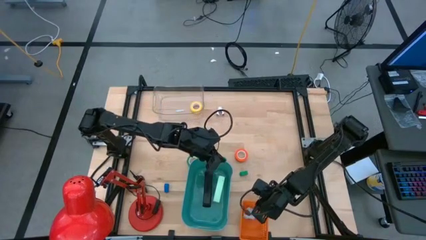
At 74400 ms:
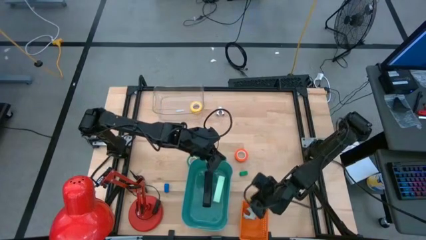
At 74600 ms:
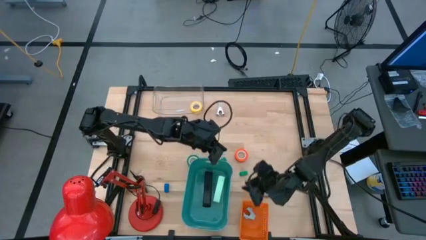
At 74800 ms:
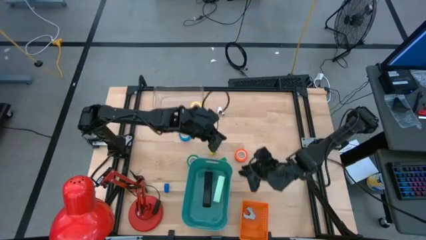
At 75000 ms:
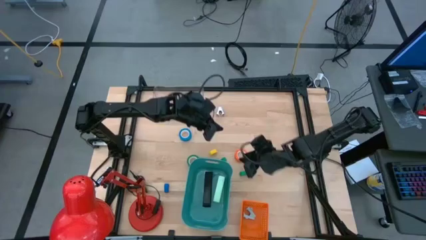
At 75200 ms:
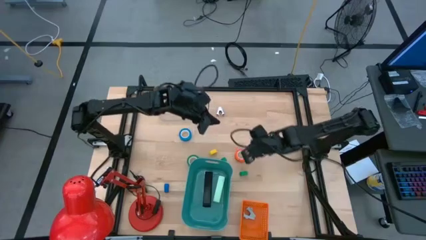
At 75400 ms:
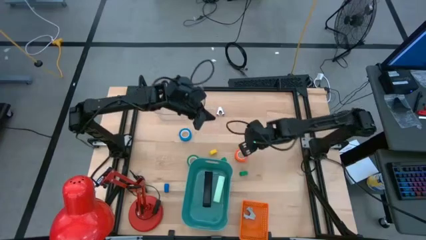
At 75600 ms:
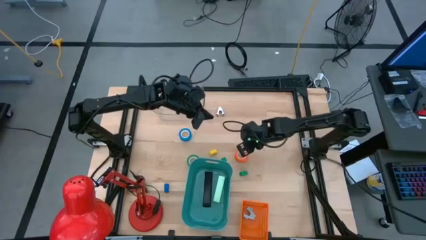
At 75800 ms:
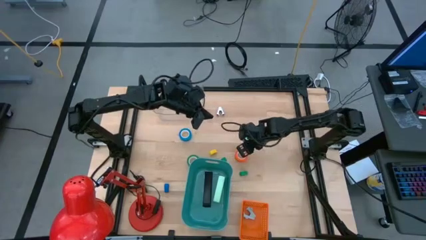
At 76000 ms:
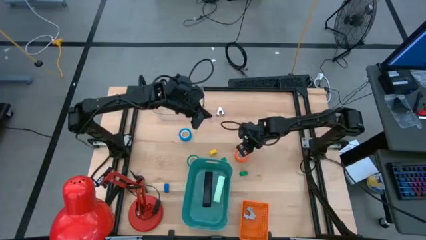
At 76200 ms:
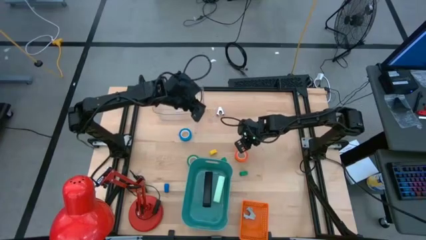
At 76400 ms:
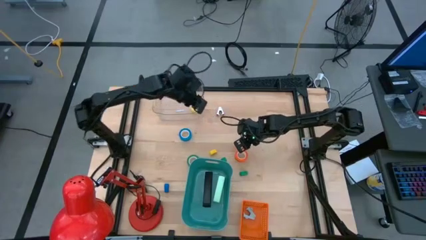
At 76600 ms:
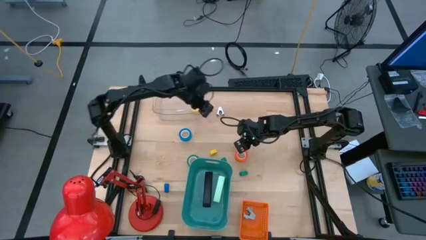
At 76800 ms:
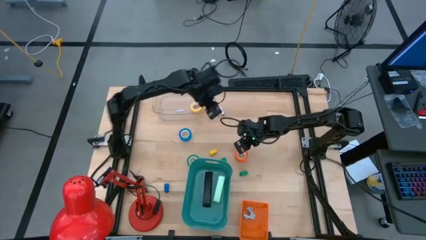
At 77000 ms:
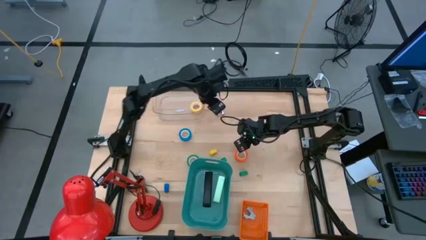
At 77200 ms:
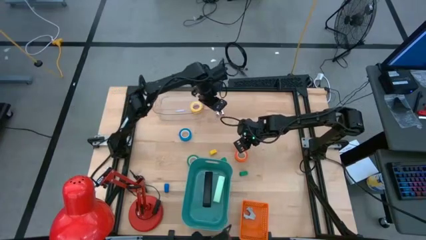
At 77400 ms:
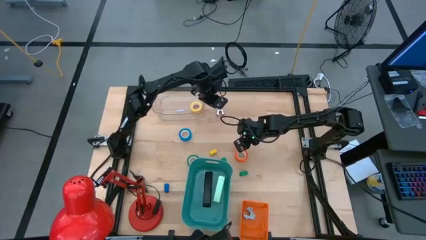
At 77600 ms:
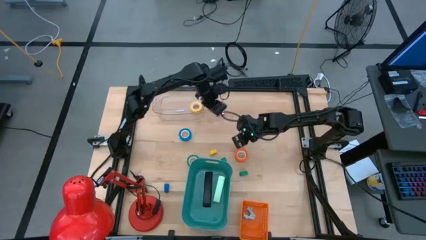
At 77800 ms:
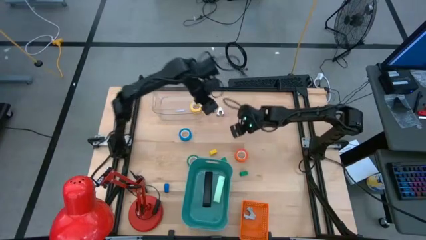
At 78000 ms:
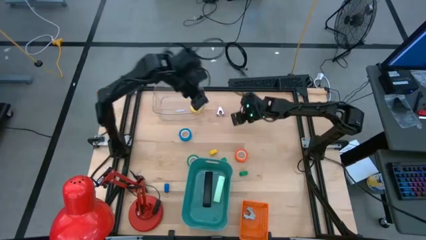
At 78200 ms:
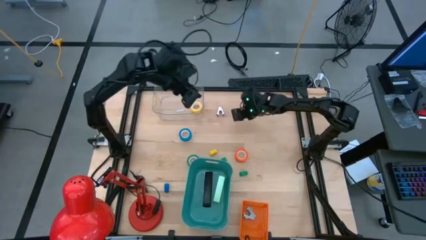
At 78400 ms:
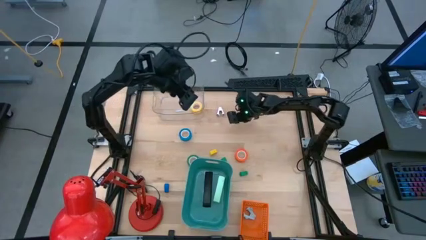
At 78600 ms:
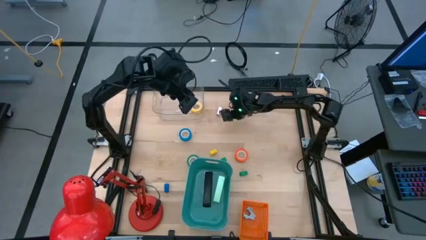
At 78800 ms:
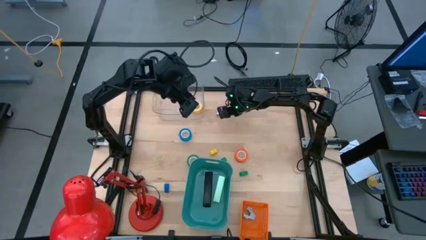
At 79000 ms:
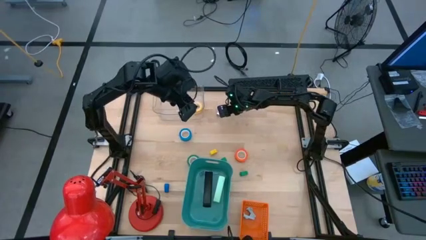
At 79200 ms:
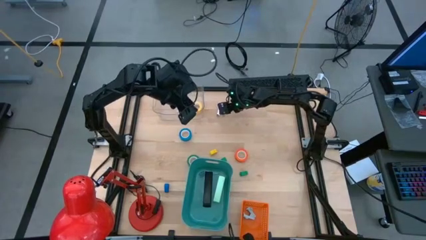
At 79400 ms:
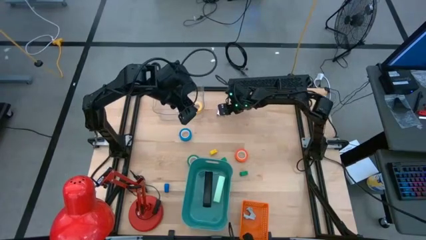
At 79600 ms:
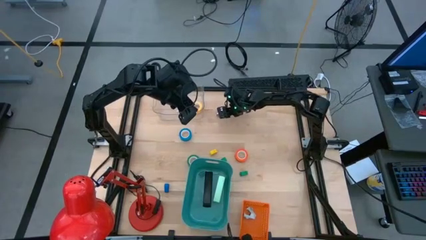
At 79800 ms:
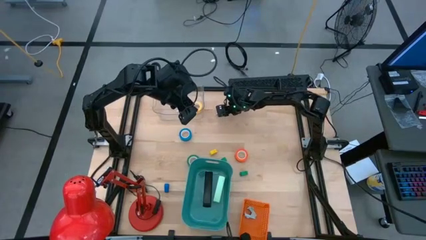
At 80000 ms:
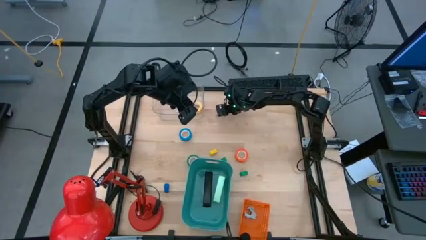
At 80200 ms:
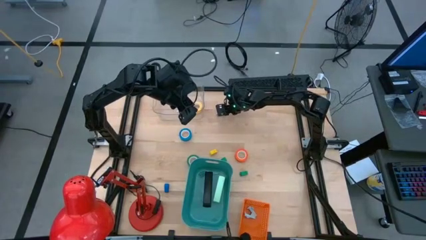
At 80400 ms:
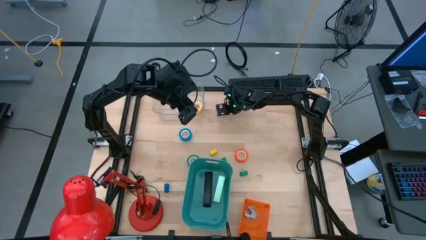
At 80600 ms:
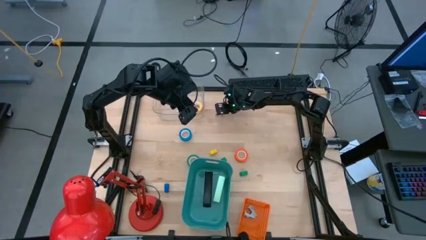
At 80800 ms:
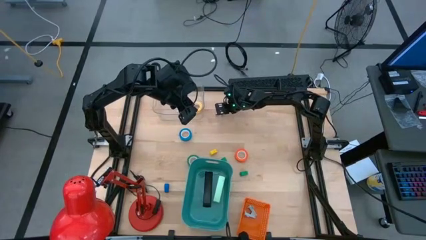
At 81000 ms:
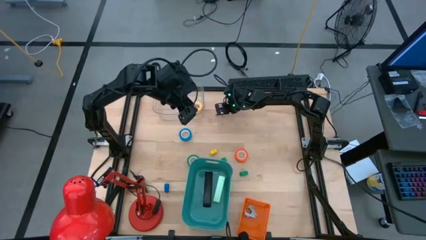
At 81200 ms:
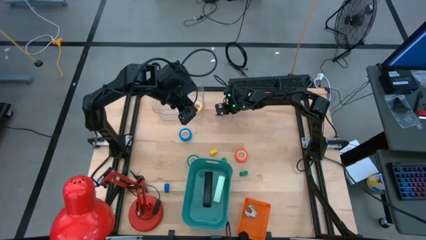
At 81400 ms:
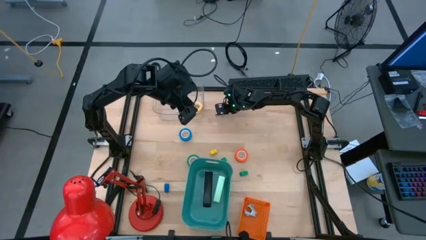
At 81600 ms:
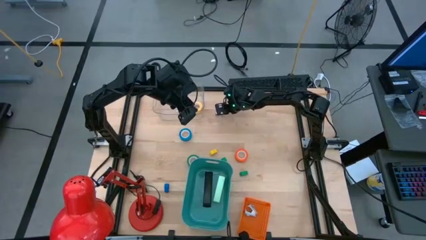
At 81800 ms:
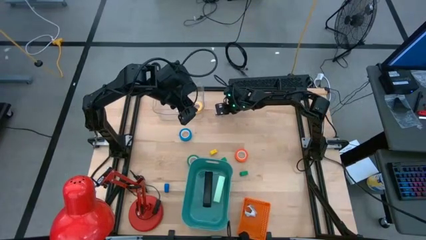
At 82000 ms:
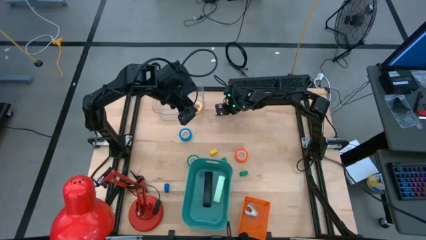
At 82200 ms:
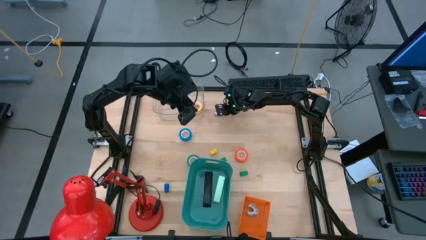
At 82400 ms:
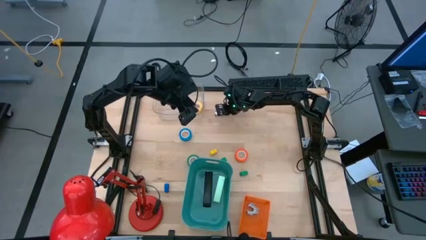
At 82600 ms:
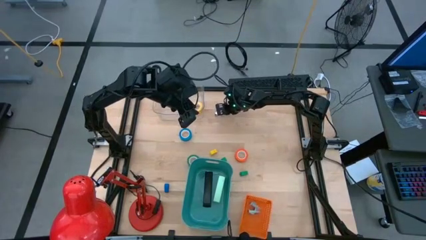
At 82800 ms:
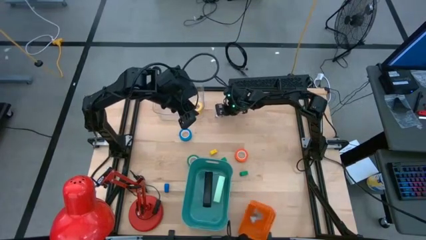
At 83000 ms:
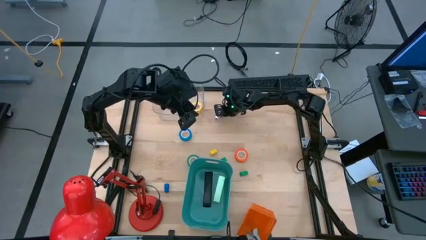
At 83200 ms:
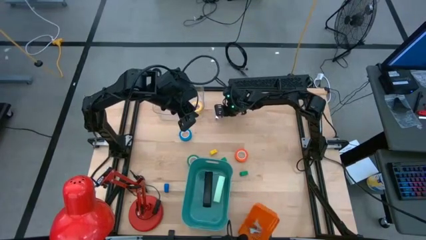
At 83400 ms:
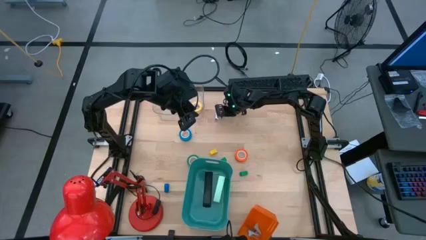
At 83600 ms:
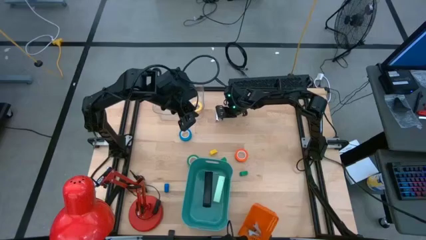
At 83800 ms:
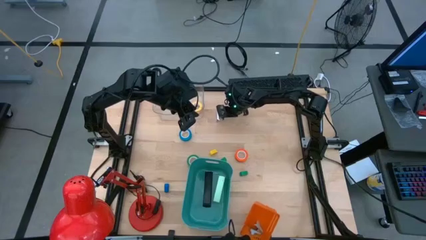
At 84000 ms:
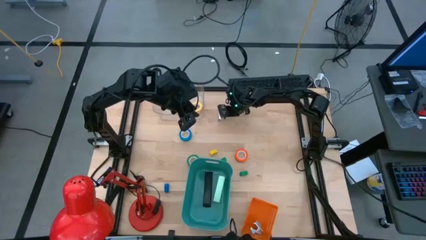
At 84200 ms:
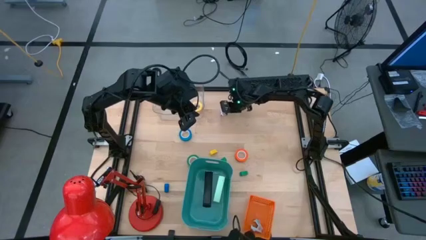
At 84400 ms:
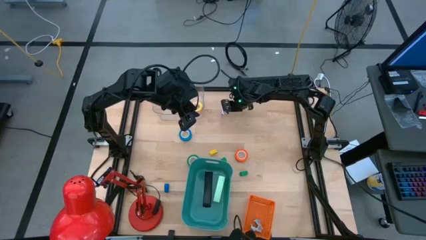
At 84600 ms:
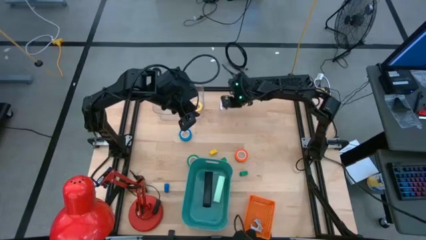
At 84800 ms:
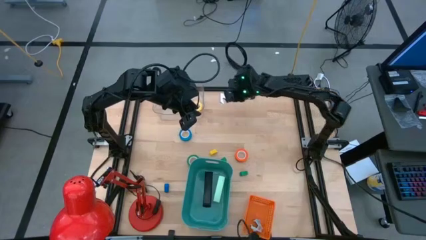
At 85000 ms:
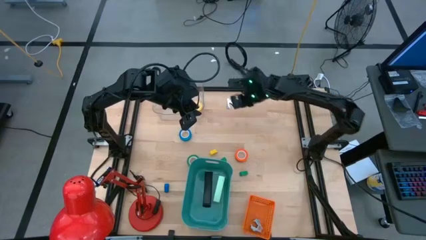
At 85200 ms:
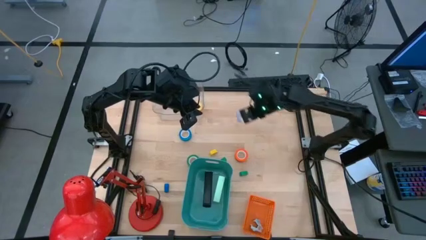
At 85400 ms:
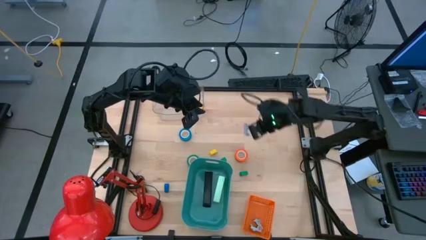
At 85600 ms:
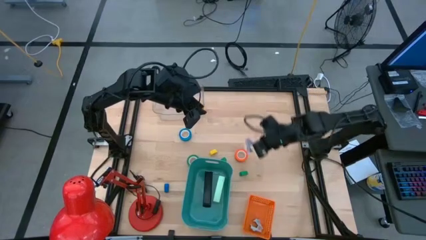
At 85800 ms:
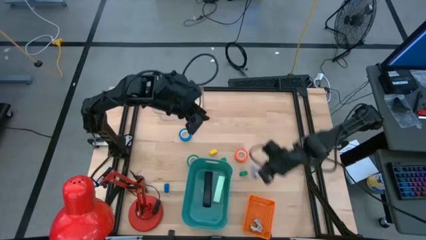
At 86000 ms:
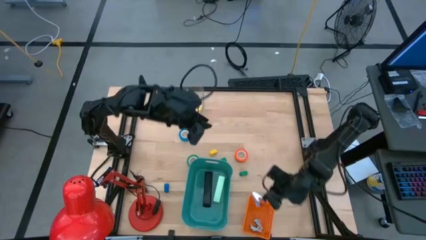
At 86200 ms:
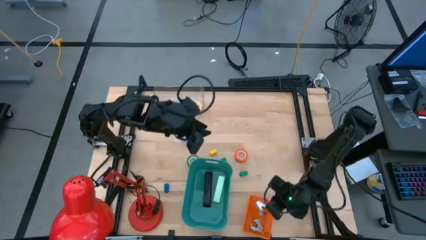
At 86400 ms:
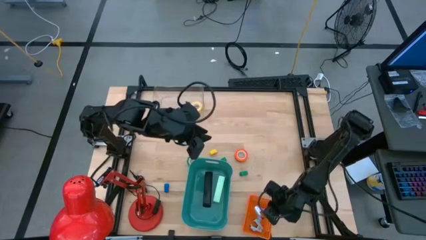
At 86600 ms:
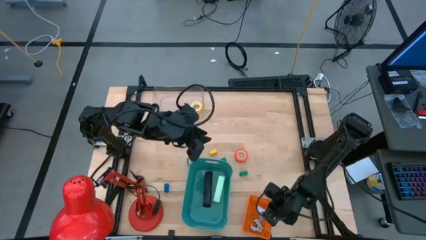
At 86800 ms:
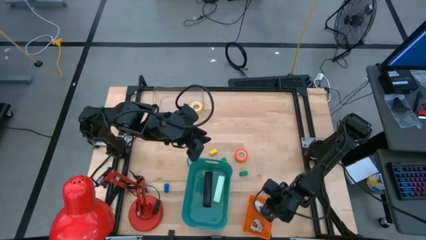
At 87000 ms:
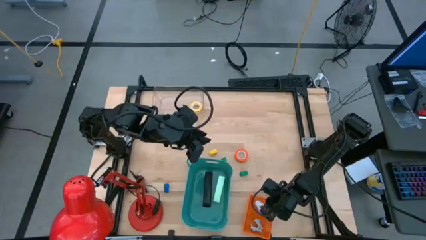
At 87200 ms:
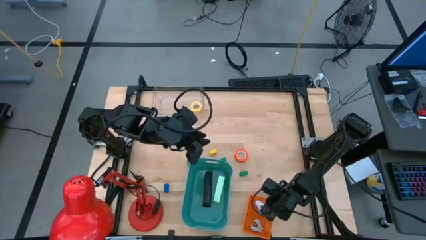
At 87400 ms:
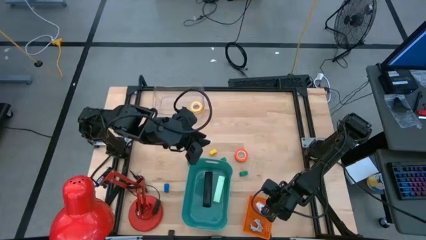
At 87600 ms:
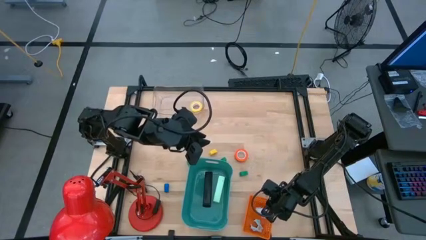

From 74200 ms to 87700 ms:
Task: Pick and place Stapler, Stapler remover, tape
Put the purple staple remover into the orange bin
